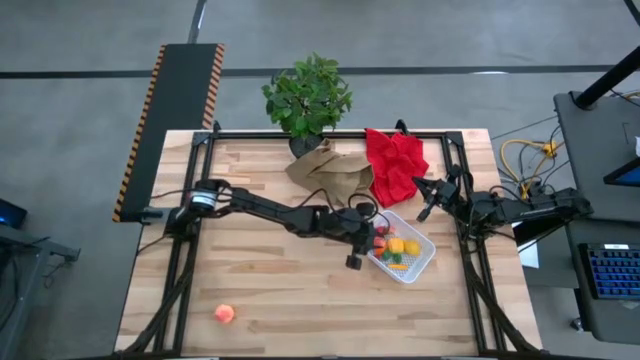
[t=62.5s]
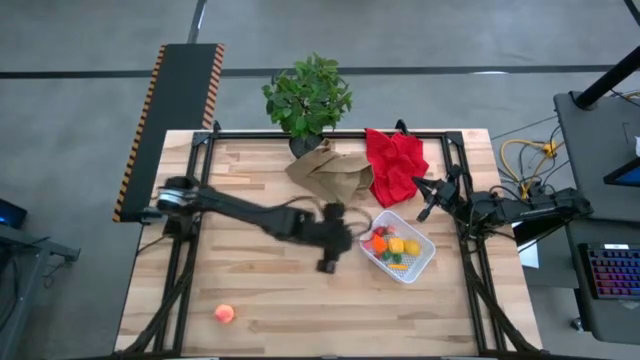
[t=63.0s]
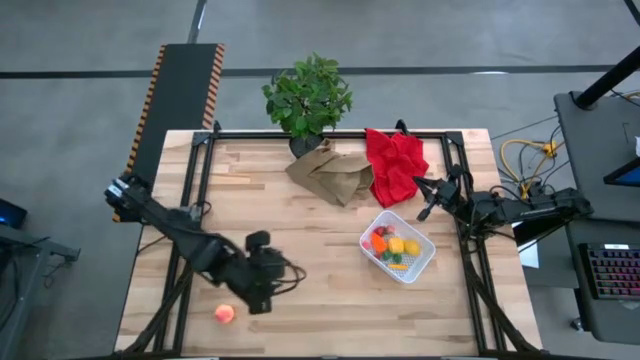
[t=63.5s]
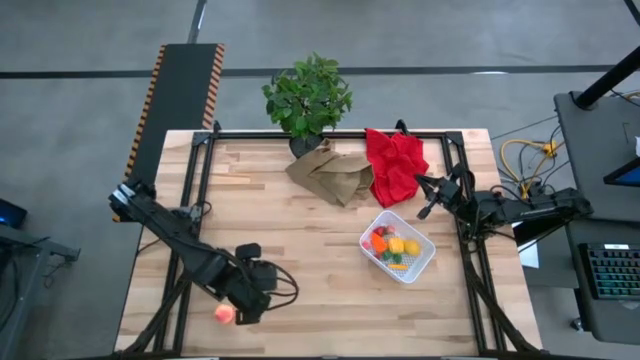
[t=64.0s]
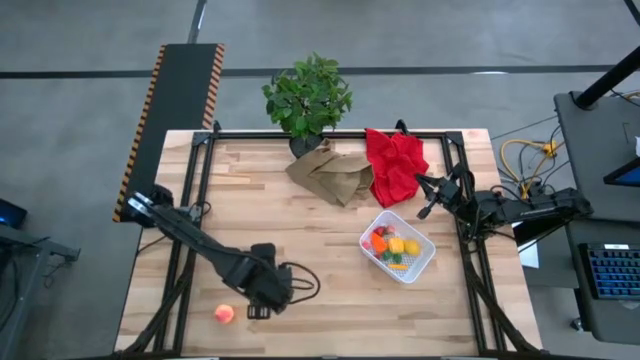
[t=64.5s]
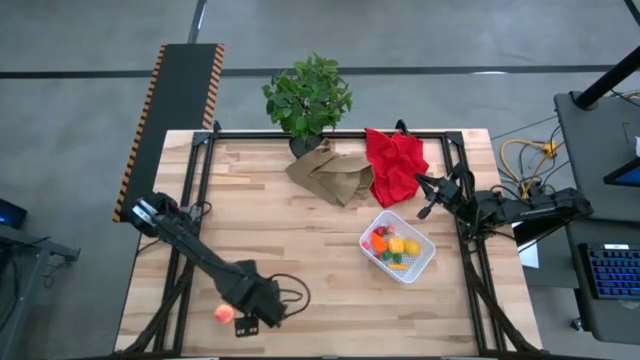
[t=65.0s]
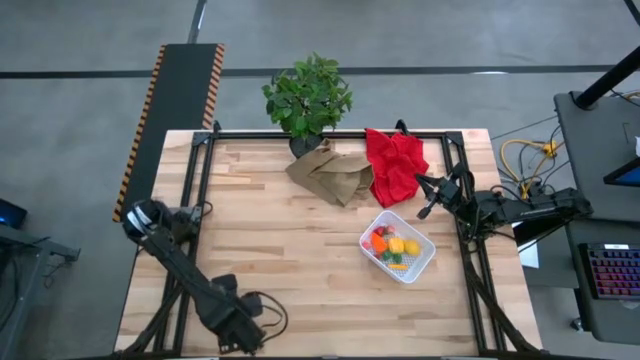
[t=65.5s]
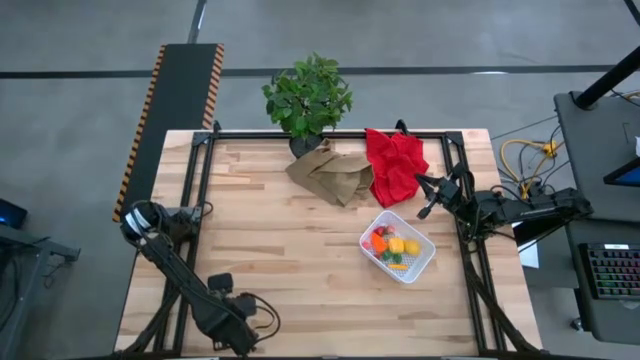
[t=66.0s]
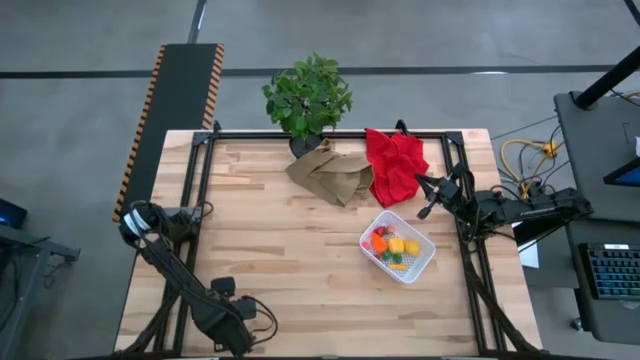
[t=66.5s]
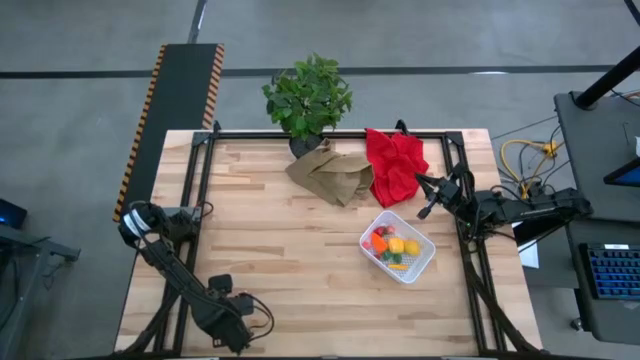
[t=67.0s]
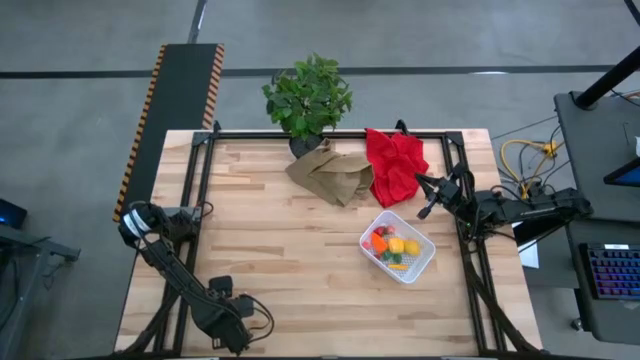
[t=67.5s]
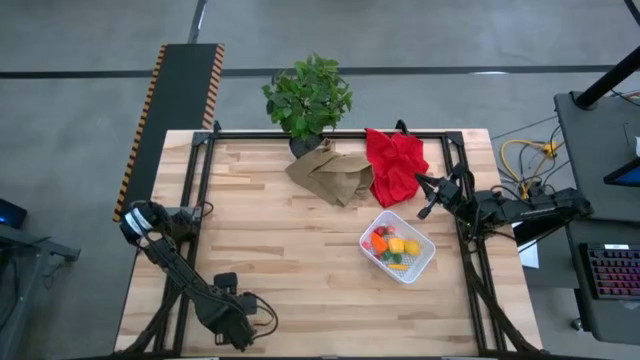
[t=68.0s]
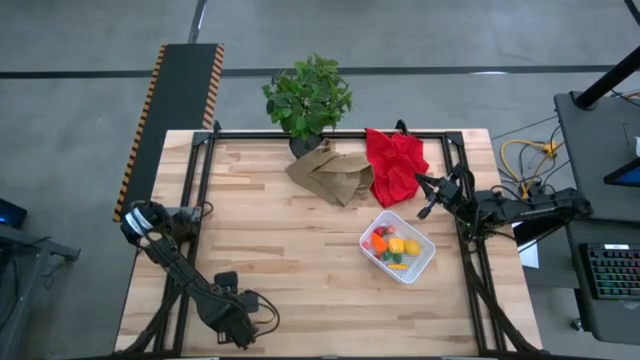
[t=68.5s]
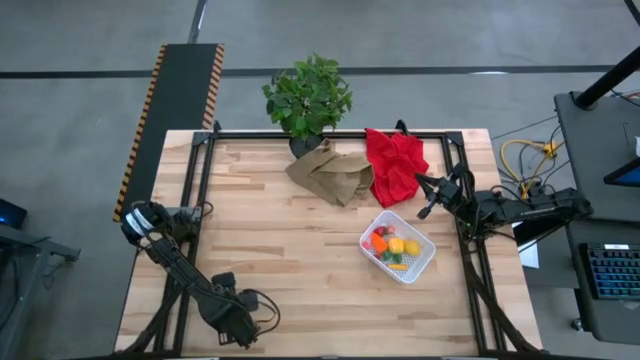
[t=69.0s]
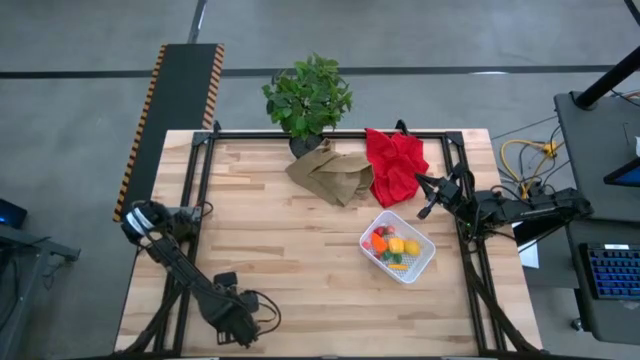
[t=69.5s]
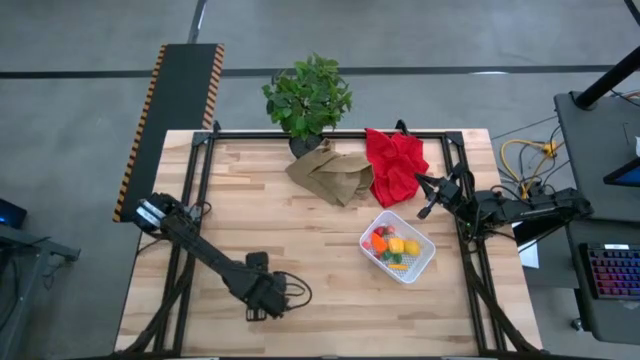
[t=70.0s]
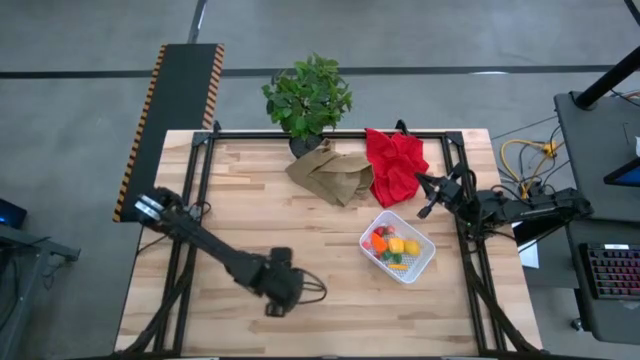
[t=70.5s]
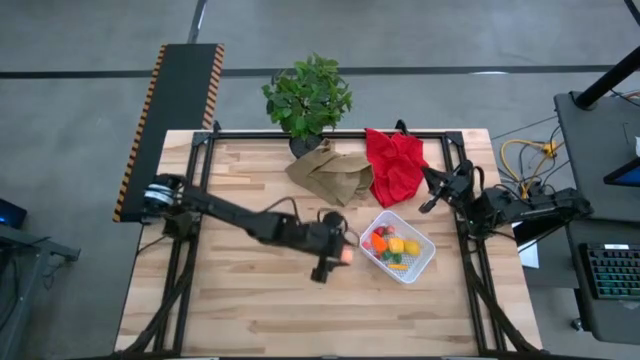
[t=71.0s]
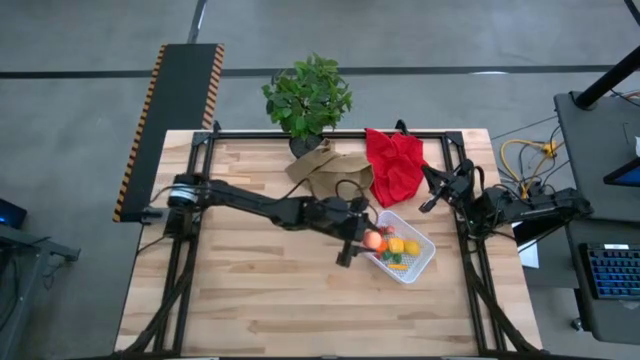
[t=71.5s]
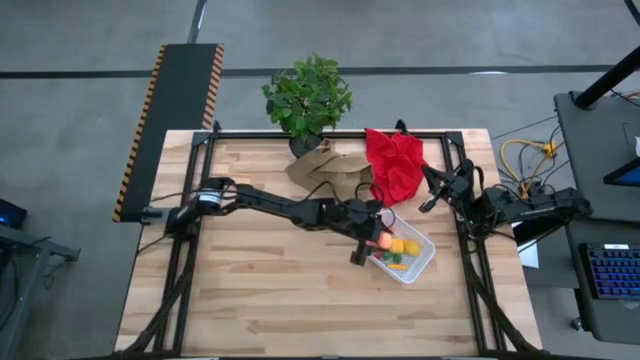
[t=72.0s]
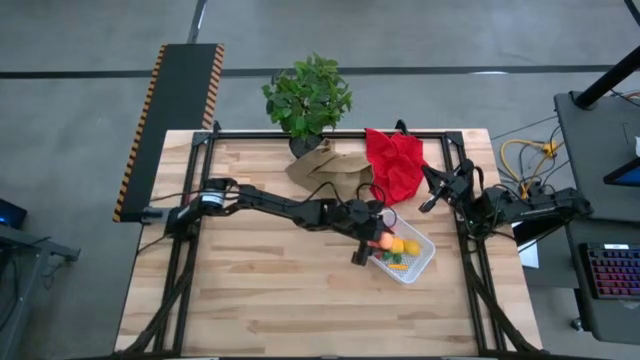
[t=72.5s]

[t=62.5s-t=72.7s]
Task: Pick and placing Produce into tupperware
Put the large pink peach into the white bin

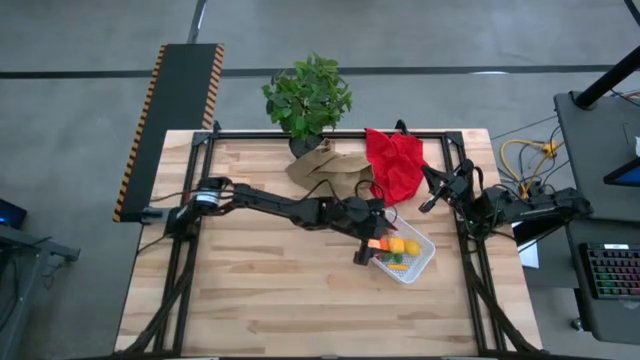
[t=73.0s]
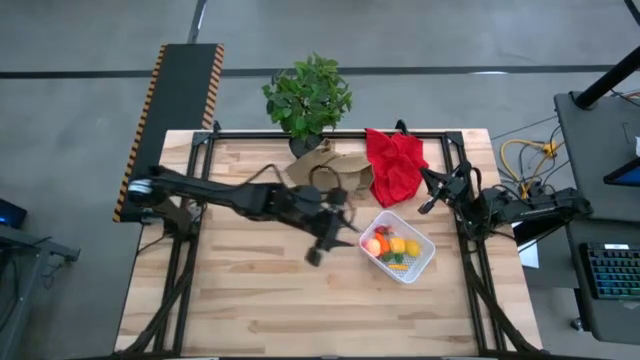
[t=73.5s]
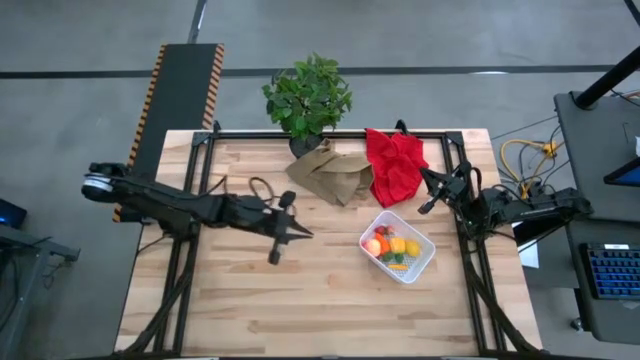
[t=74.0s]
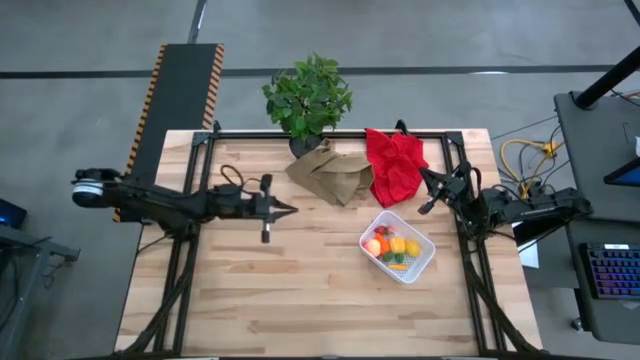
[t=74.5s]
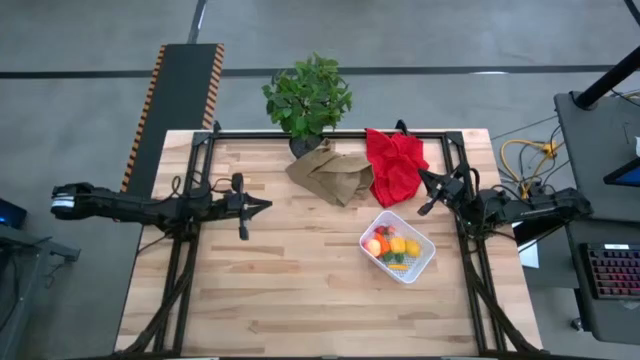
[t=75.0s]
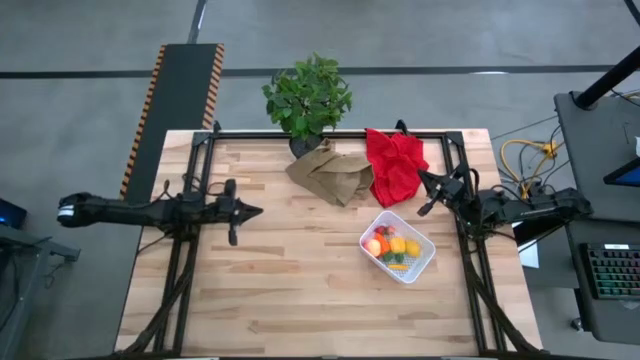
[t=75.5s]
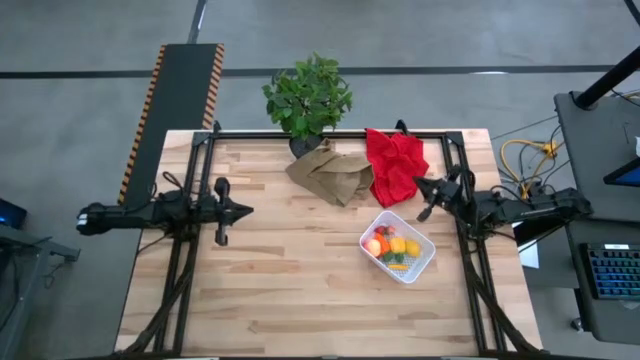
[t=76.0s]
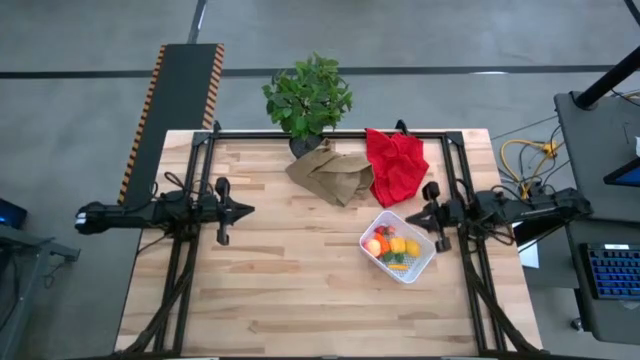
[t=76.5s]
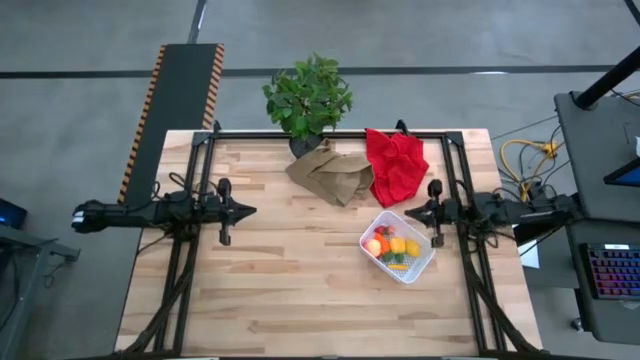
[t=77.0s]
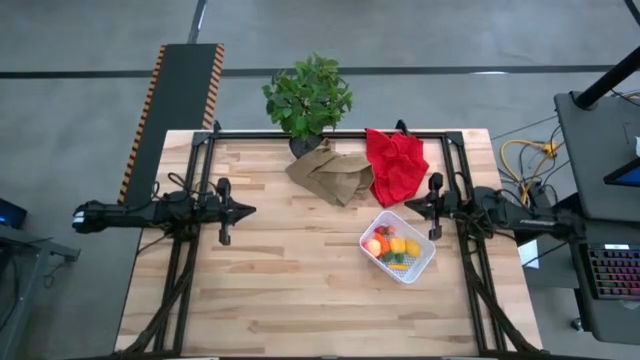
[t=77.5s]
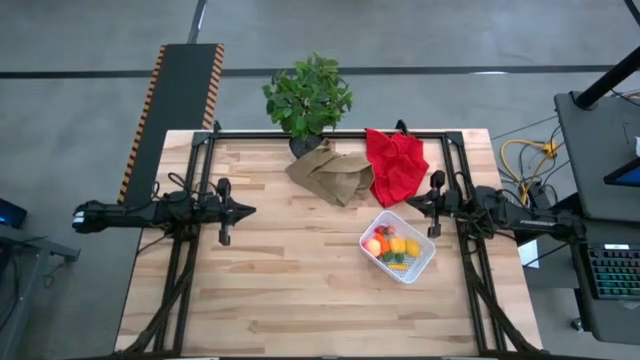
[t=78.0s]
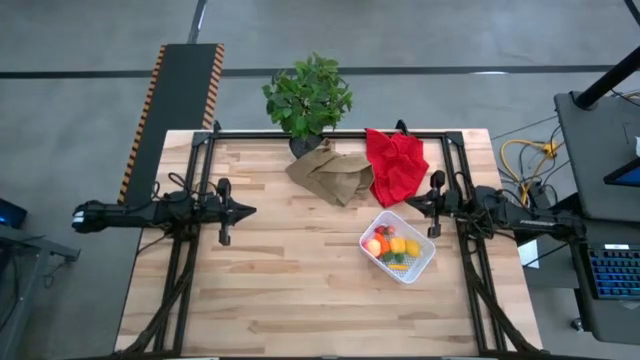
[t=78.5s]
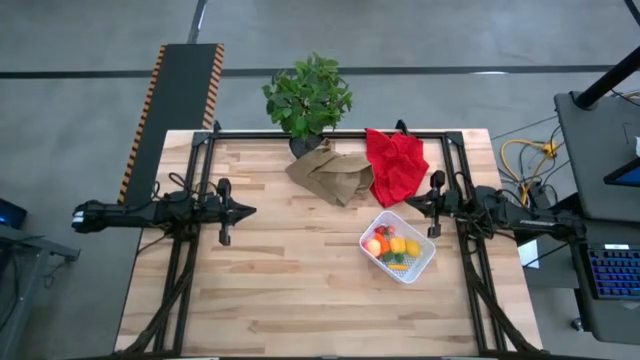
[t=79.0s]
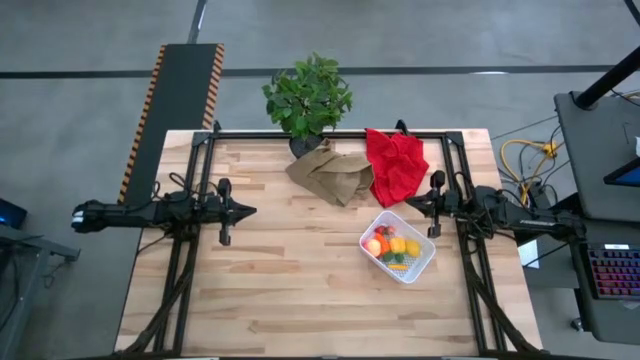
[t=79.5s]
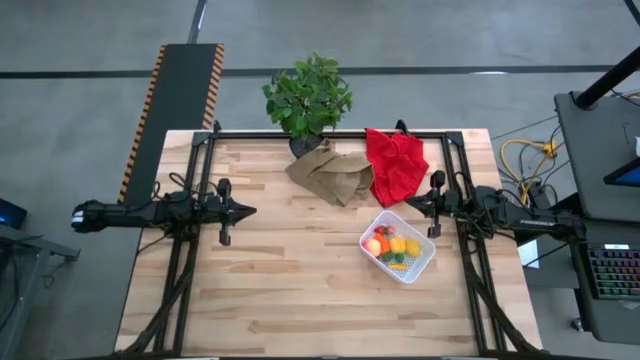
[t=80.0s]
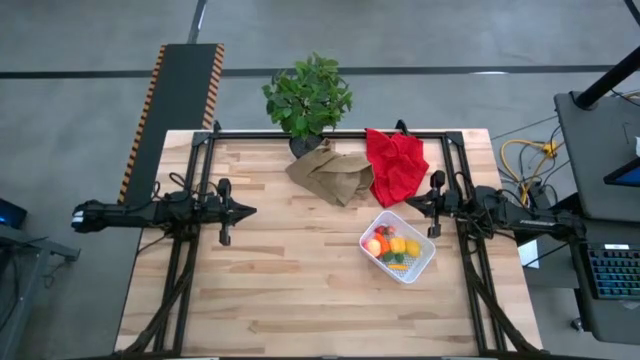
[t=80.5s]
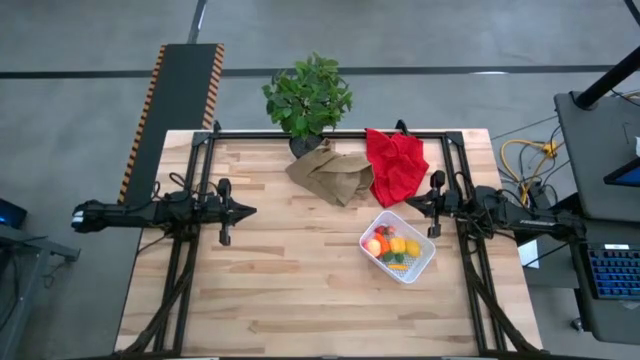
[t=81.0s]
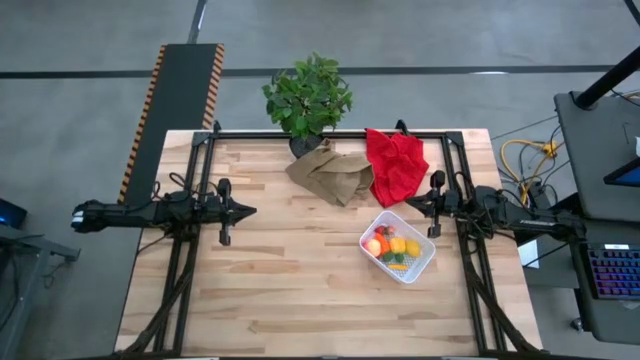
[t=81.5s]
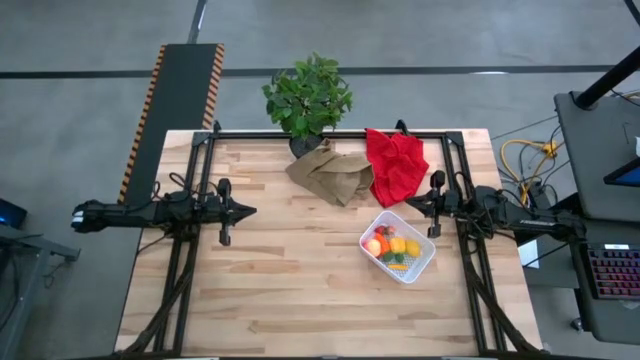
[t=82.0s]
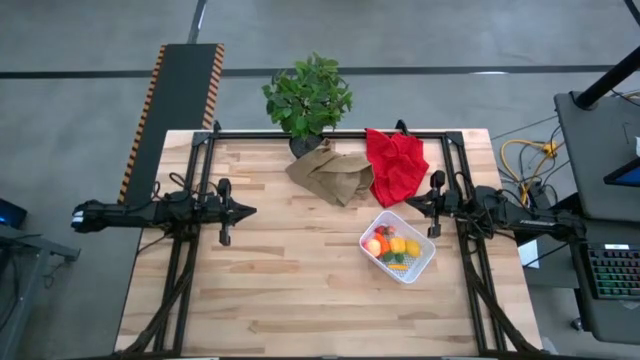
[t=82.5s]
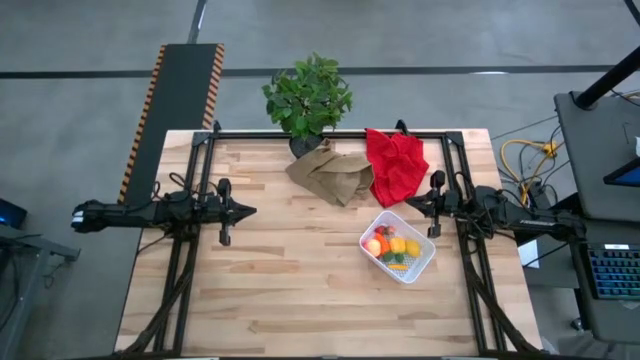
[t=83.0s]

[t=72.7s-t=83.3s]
Return to Home Position

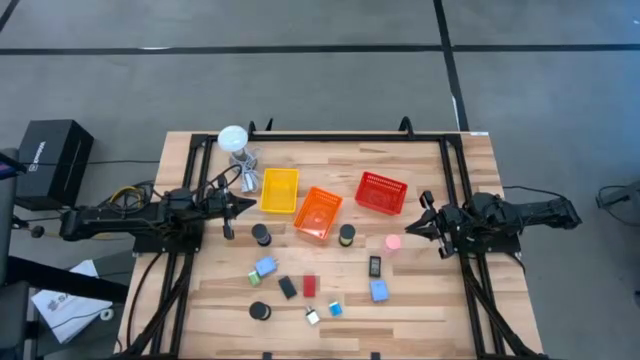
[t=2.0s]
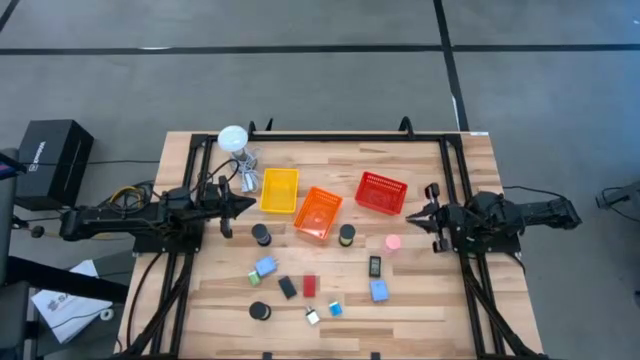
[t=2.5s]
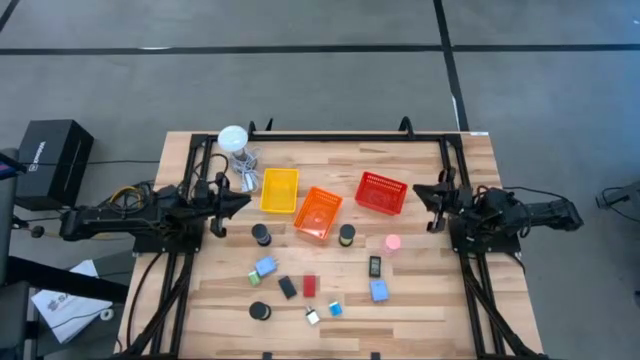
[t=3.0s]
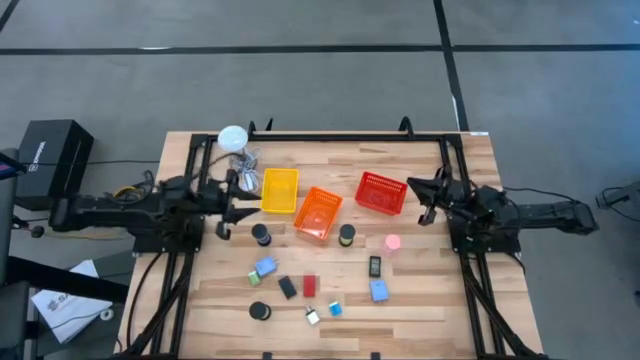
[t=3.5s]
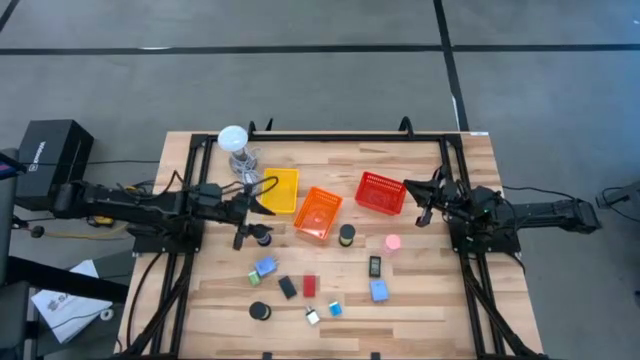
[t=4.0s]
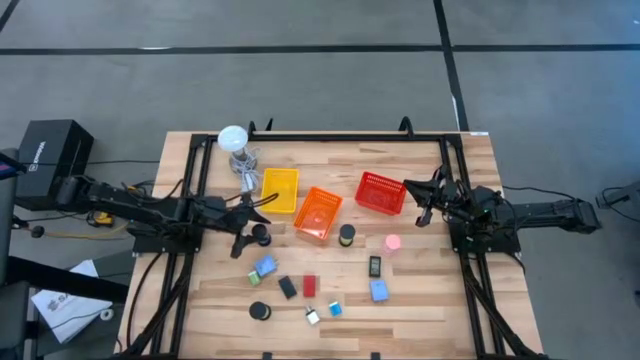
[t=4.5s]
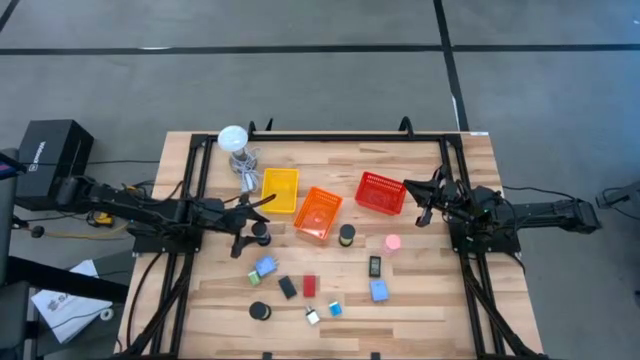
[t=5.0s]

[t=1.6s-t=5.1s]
Task: Pick & Place Office items
Put the top left sand timer into the yellow bin
